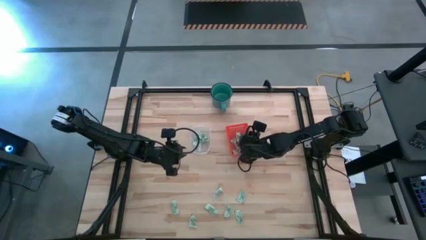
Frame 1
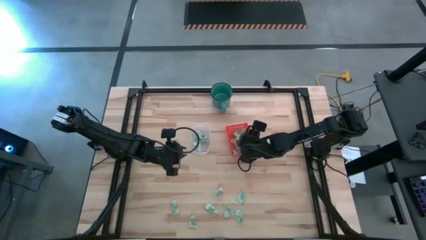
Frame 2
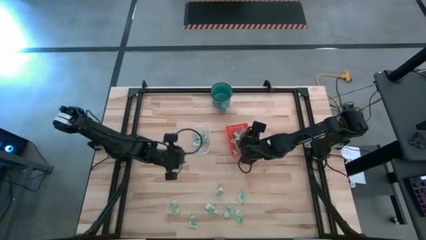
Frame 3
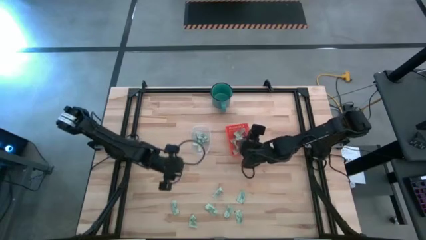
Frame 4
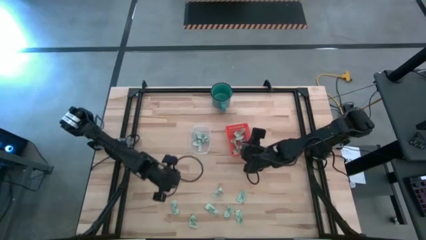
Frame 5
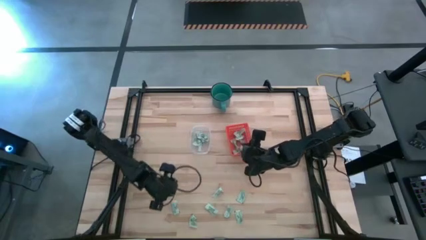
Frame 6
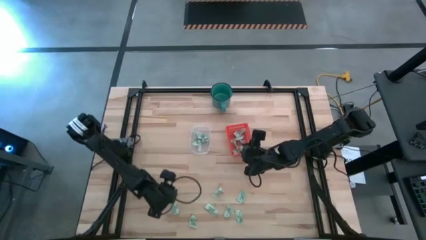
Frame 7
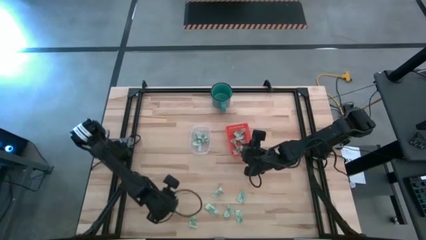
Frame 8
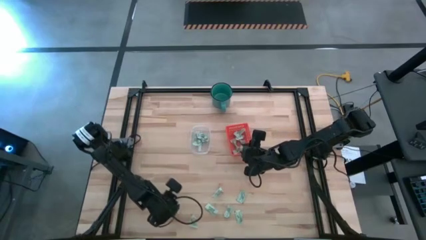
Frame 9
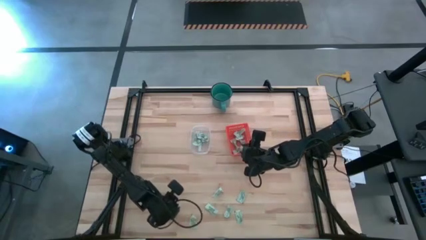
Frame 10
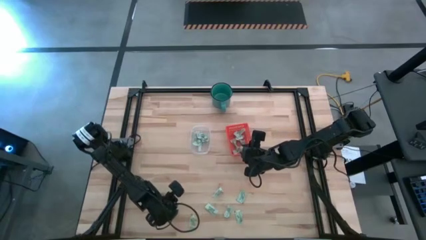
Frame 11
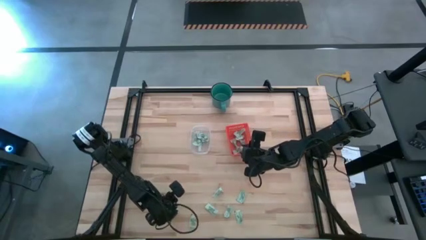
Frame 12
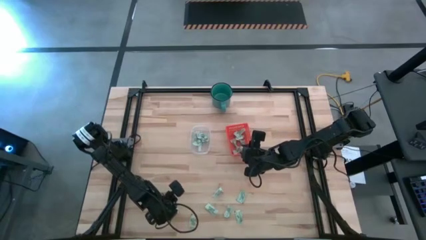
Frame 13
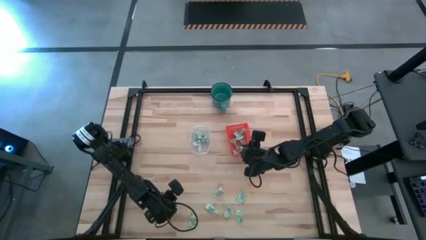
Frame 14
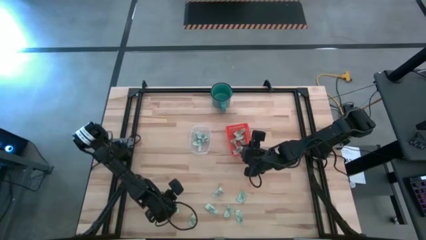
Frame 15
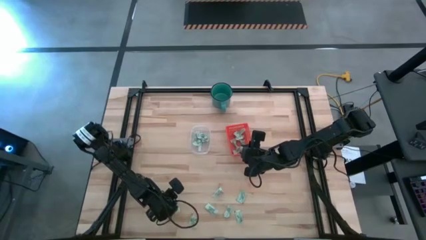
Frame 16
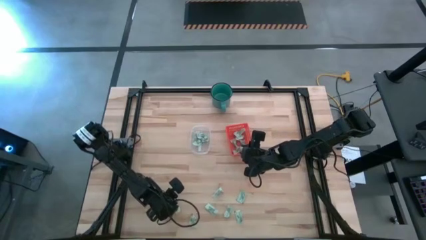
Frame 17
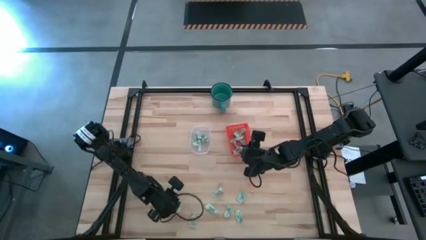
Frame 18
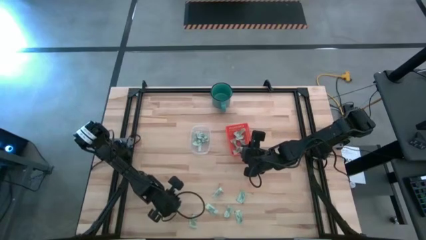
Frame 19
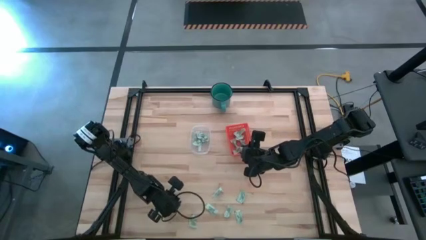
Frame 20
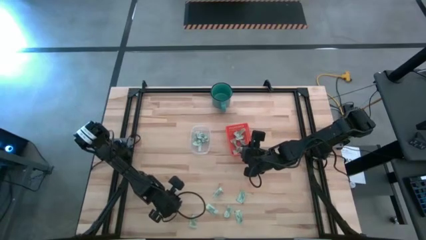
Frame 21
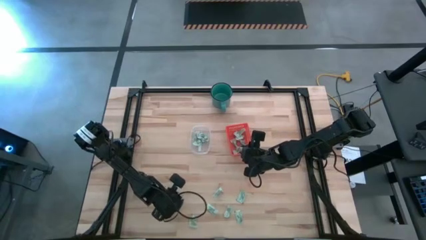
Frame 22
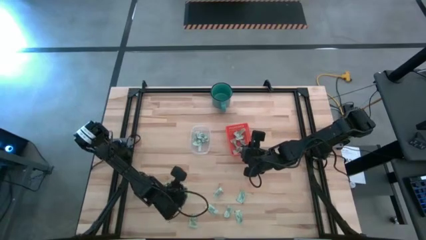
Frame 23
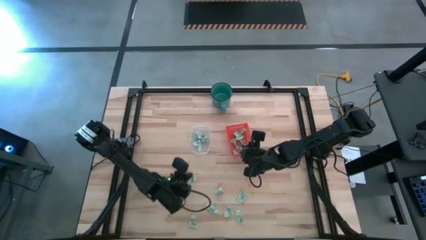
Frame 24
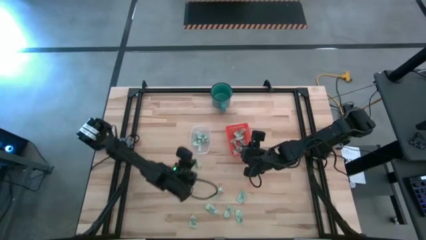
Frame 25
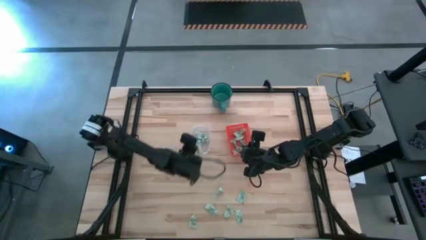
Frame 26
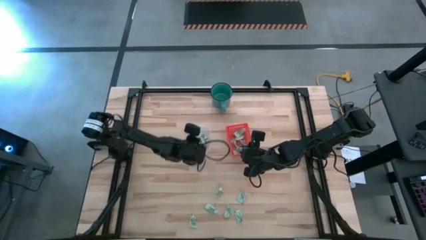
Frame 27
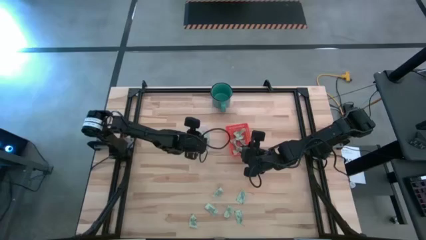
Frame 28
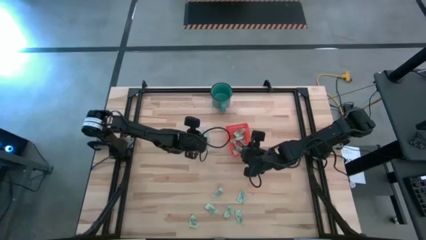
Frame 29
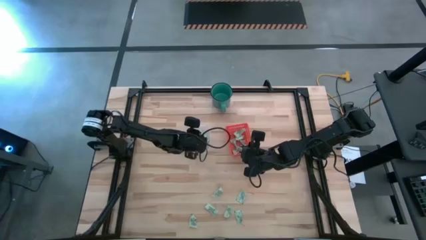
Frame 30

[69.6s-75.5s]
Task: Pick and place items into bin
Put the stevia packet into the transparent bin

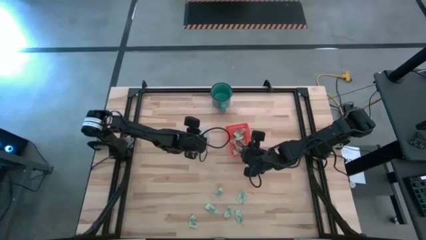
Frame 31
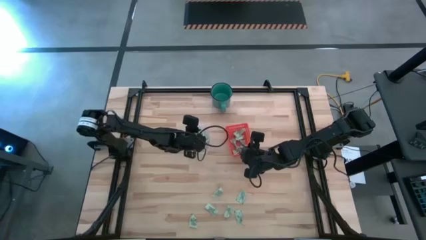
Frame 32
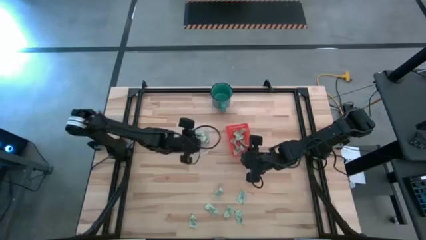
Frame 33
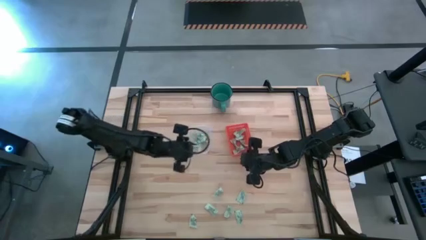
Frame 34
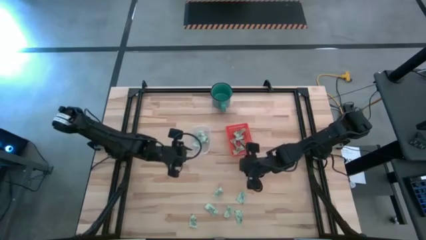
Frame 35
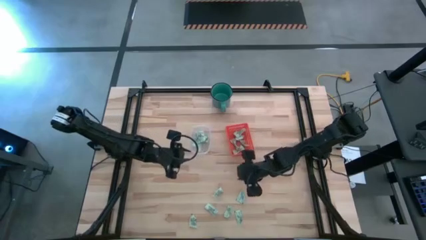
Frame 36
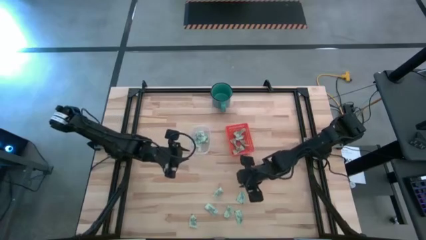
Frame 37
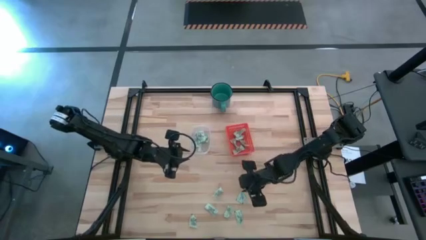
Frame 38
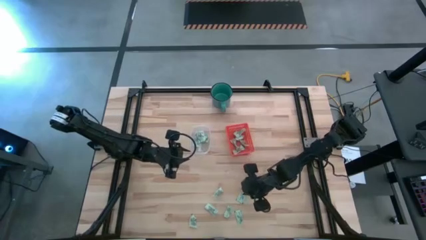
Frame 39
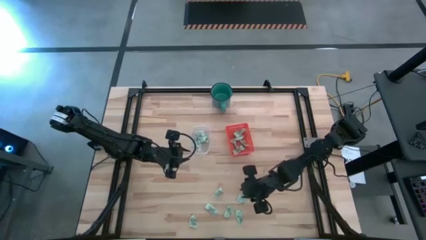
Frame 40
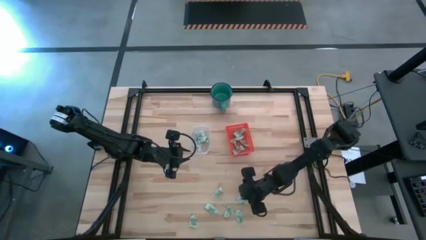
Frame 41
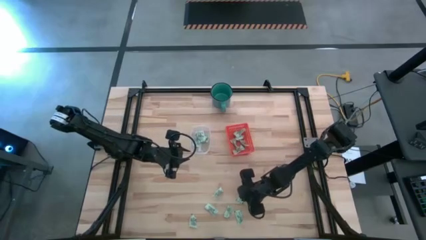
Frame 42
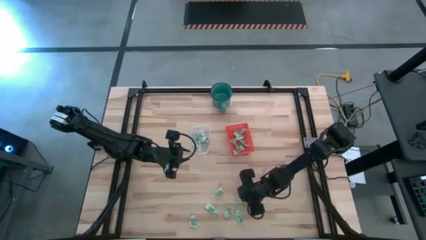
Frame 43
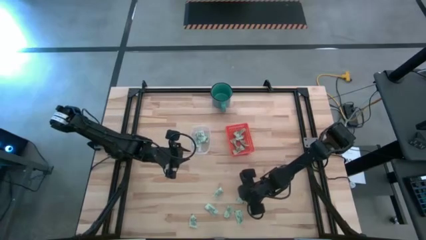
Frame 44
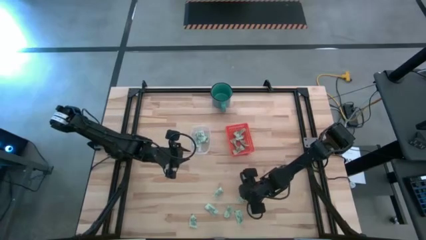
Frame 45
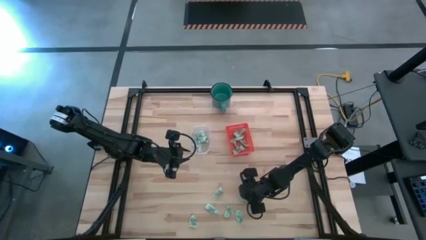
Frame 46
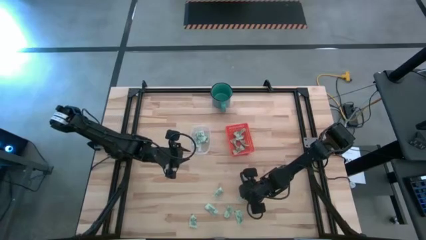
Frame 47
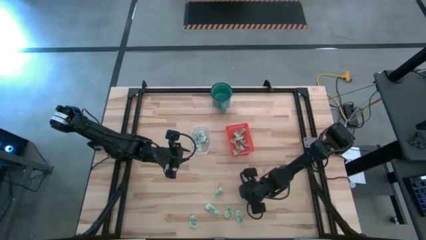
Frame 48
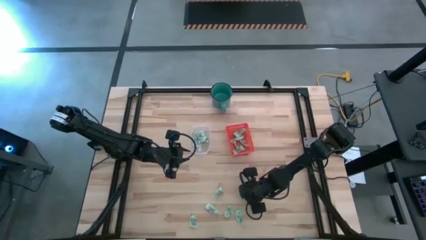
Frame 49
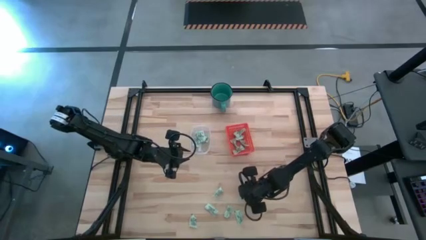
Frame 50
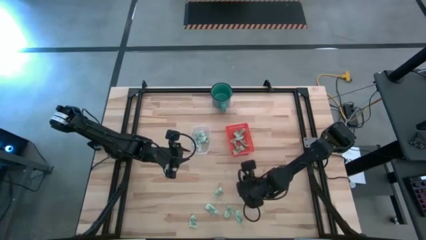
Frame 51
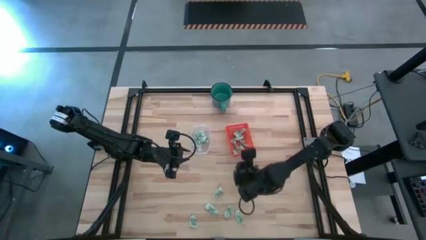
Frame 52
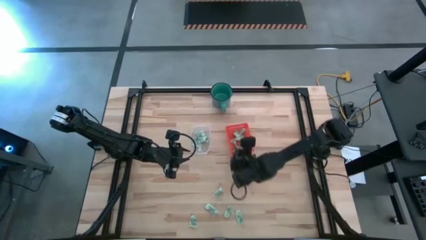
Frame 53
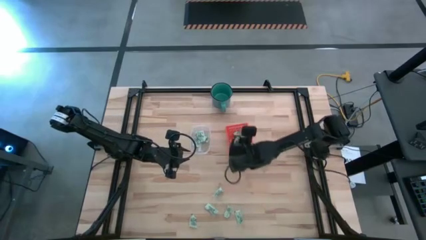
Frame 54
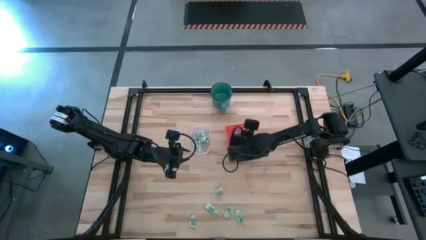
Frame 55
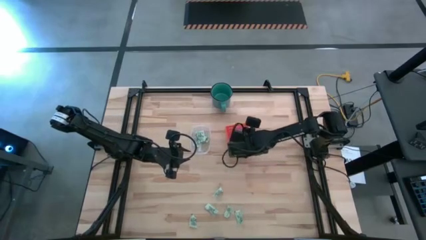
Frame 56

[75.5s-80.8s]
Put the stevia packet into the orange bin

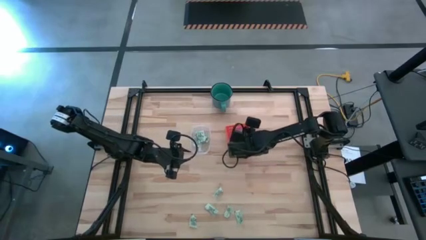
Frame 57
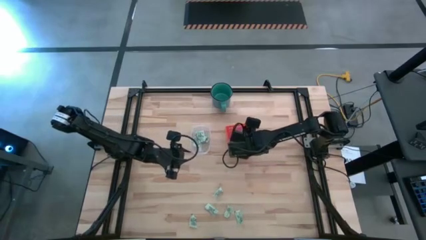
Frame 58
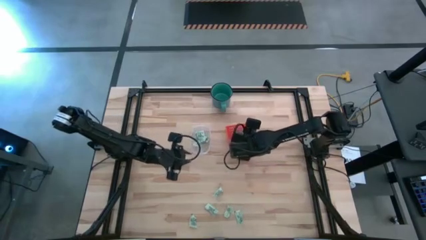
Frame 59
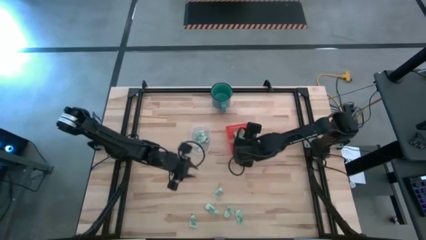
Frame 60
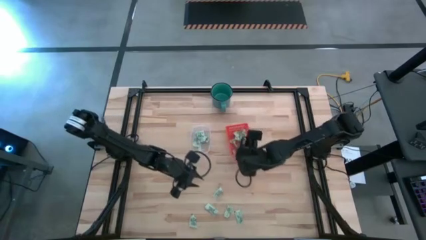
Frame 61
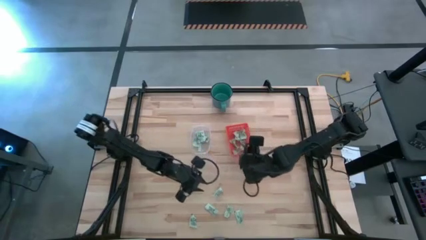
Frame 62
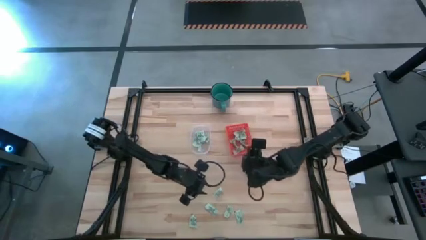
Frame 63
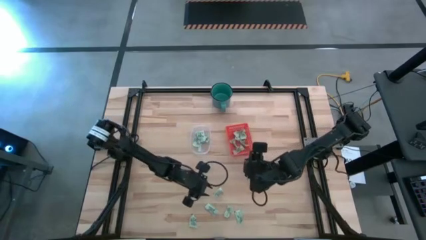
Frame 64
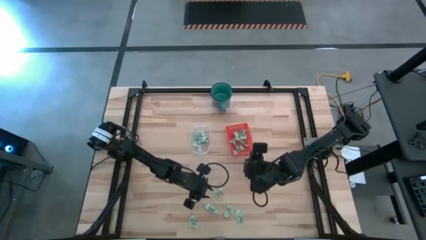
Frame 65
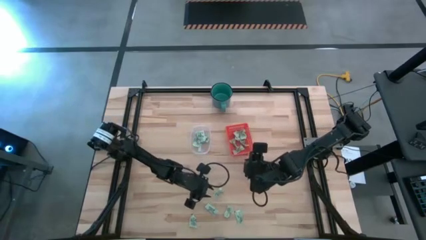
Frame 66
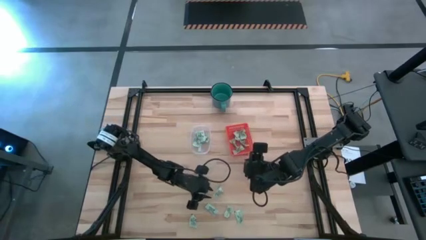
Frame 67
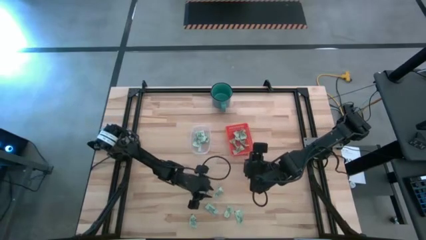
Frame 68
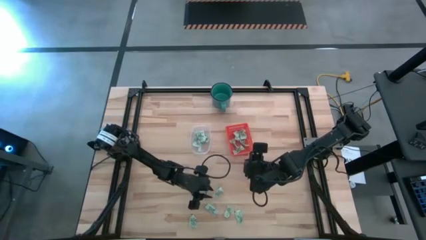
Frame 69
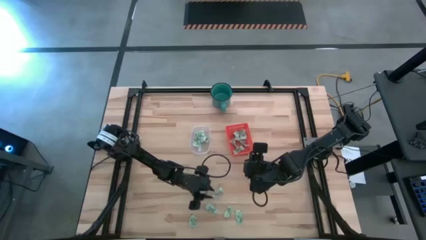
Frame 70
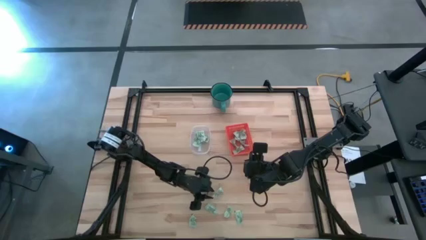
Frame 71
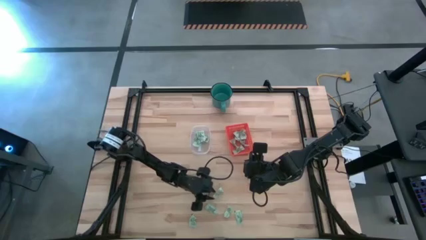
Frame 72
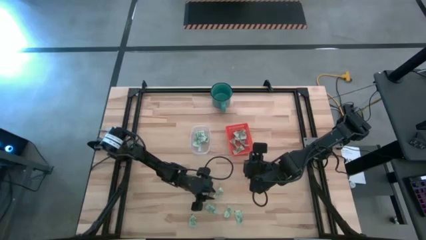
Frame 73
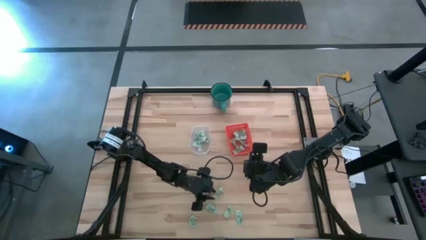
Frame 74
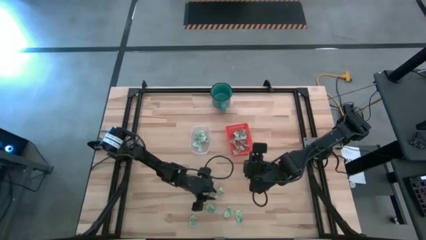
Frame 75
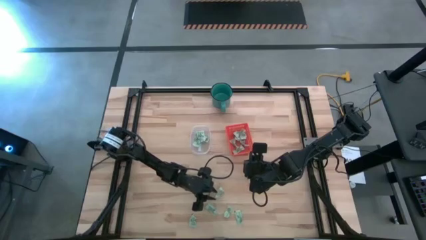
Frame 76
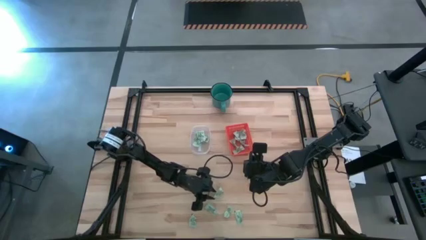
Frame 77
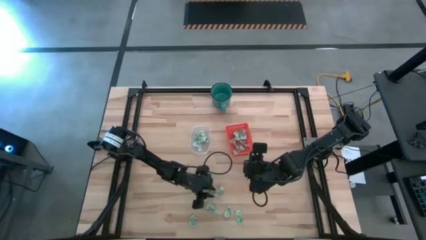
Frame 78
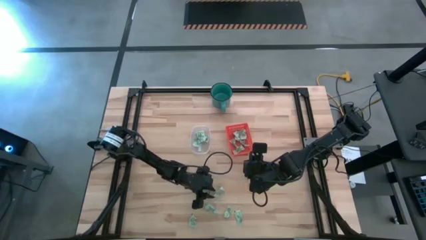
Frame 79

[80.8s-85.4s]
Put the stevia packet into the transparent bin
